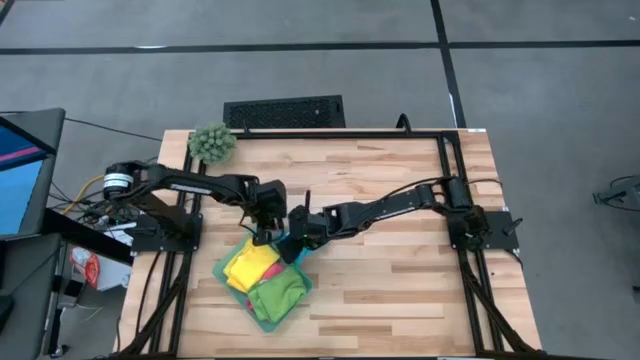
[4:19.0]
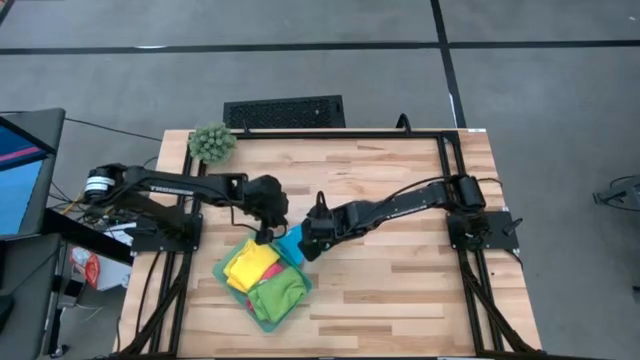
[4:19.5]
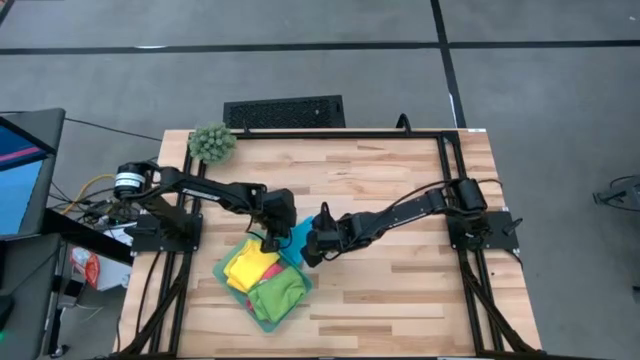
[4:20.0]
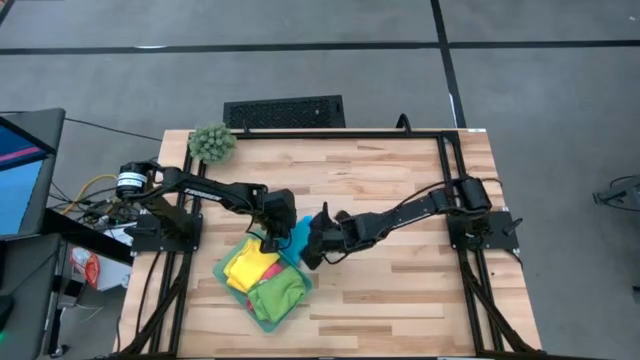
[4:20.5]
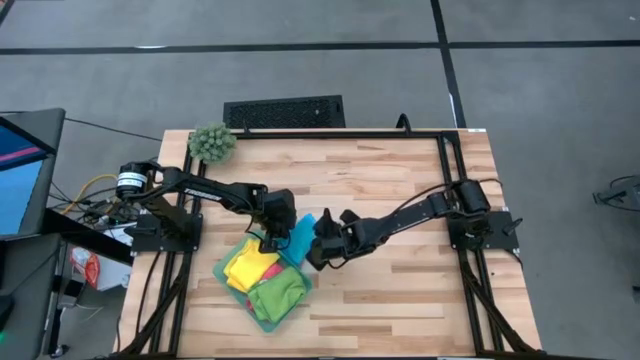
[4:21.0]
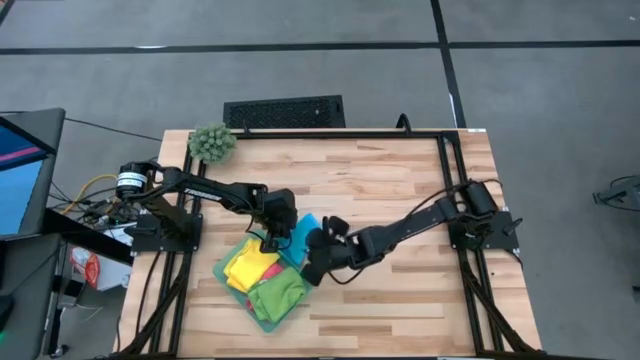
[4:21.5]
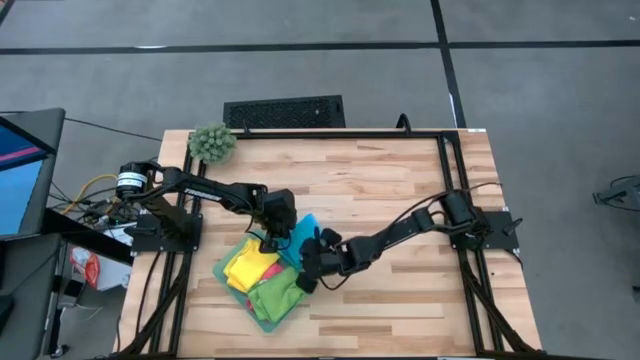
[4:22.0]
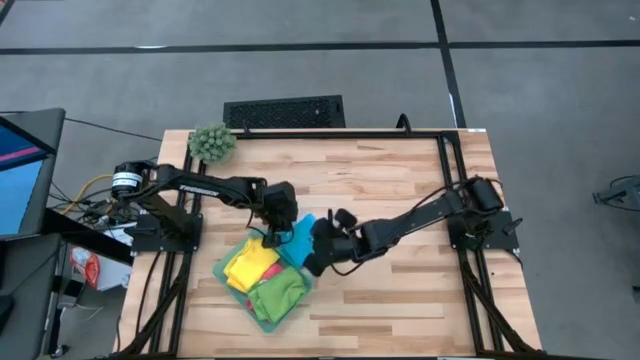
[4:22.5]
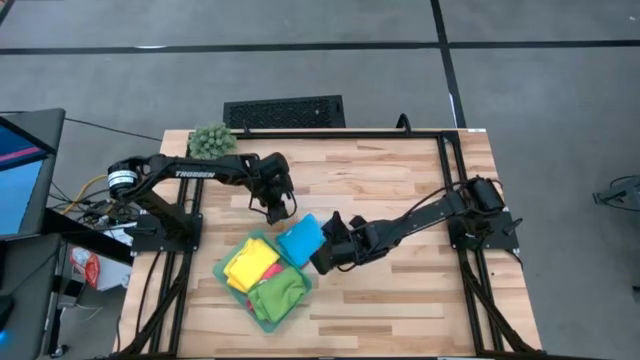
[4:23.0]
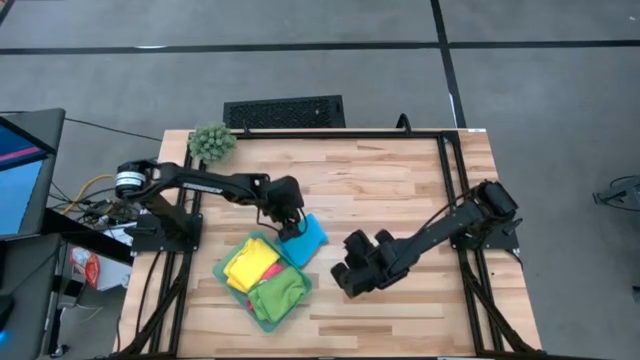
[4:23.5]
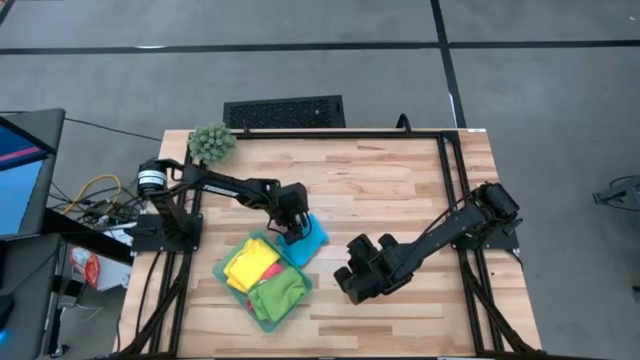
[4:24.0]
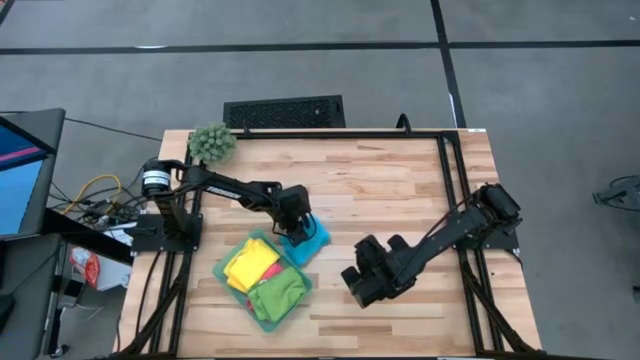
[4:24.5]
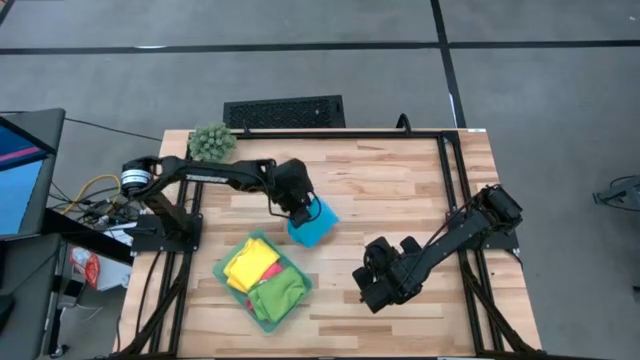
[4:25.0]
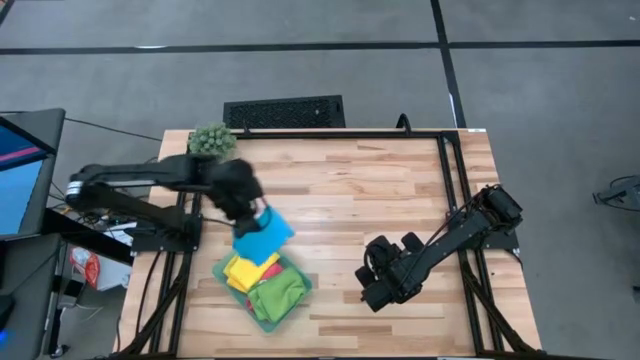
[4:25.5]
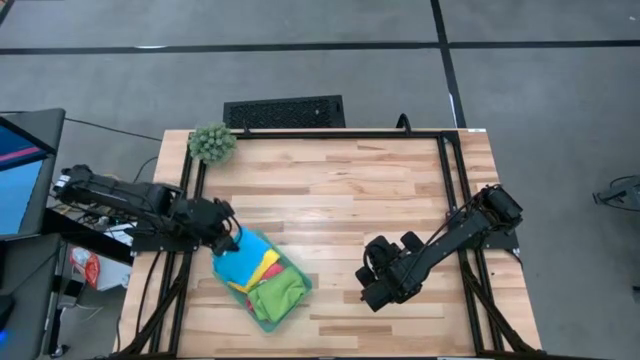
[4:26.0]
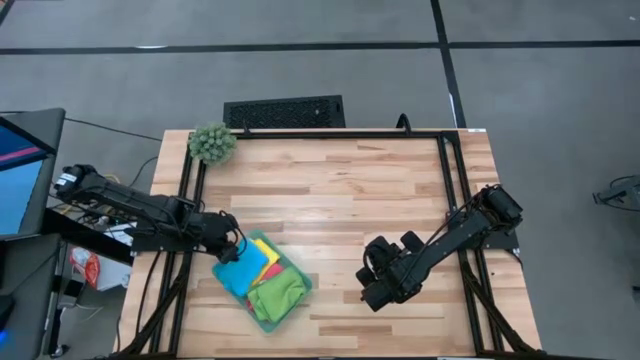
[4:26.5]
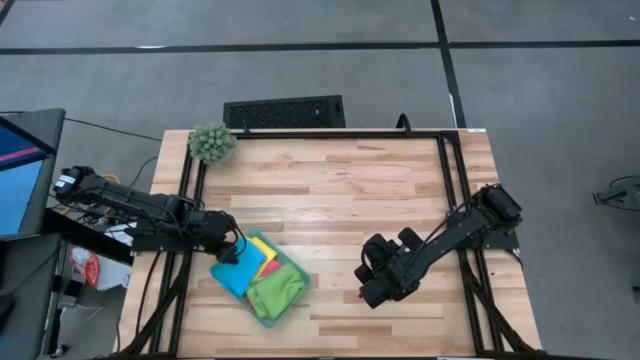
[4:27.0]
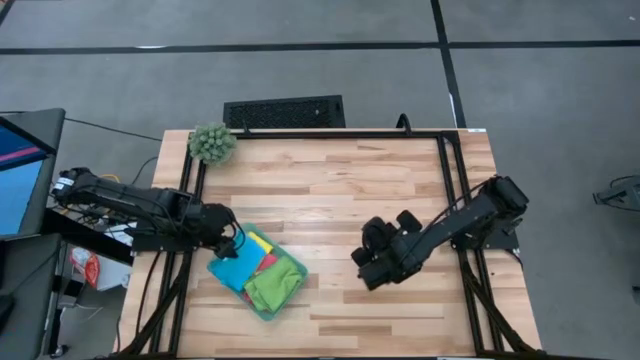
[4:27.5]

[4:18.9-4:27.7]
Task: Fold microfiber towels
Stack the folded blue towel on top of the folded yellow towel inside the green bin

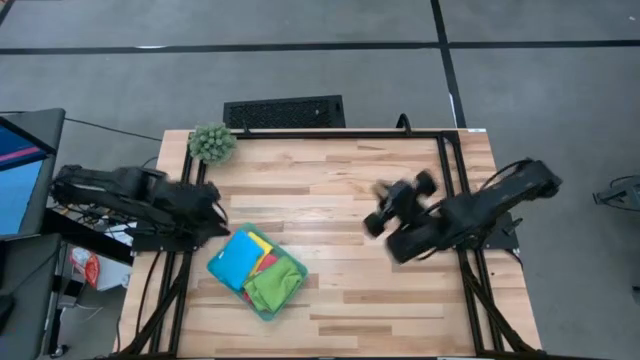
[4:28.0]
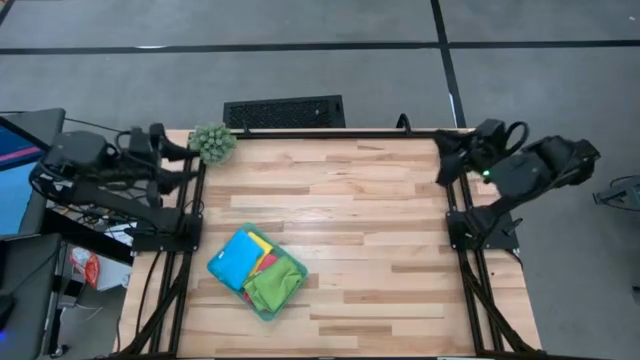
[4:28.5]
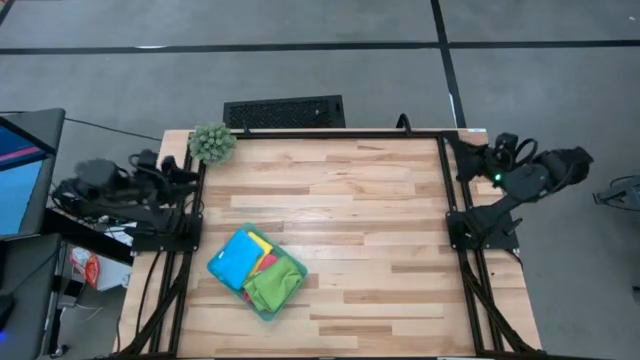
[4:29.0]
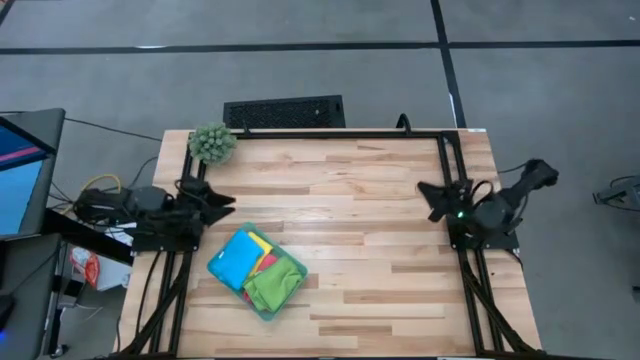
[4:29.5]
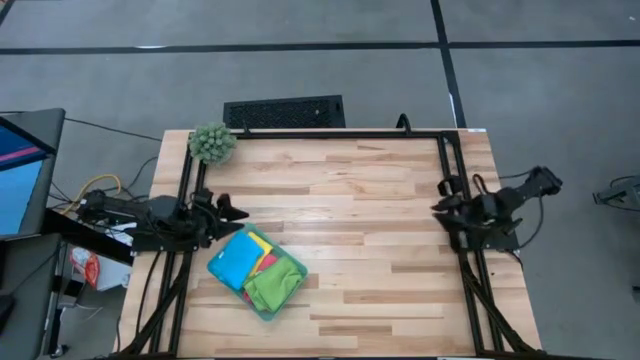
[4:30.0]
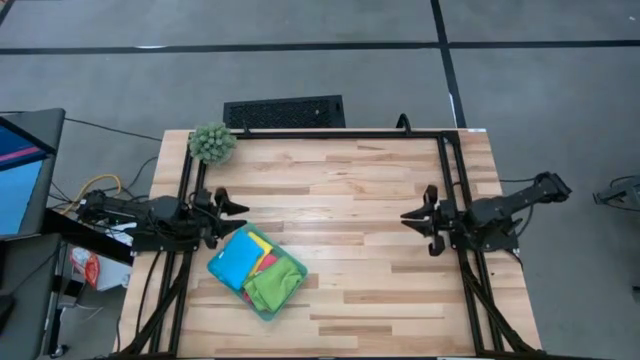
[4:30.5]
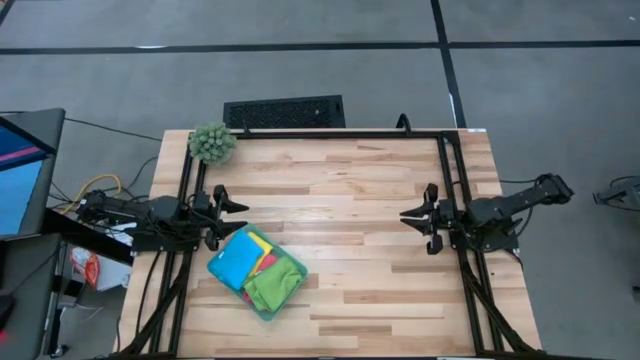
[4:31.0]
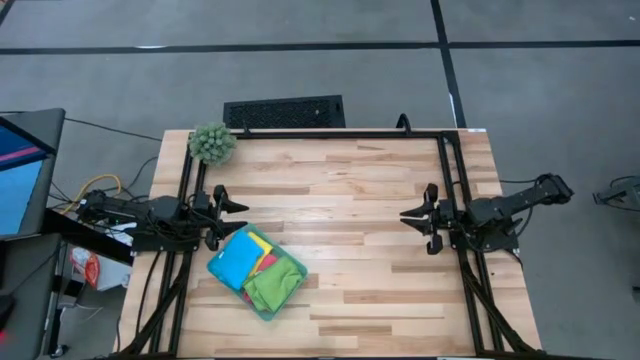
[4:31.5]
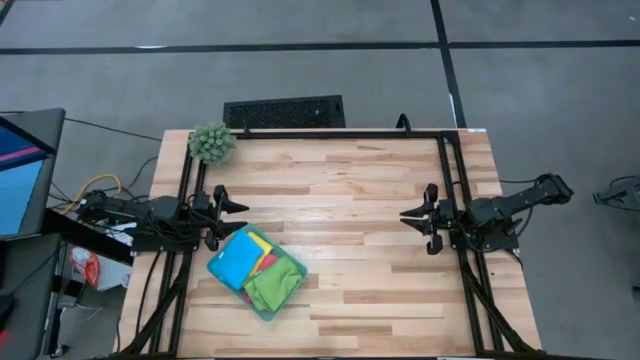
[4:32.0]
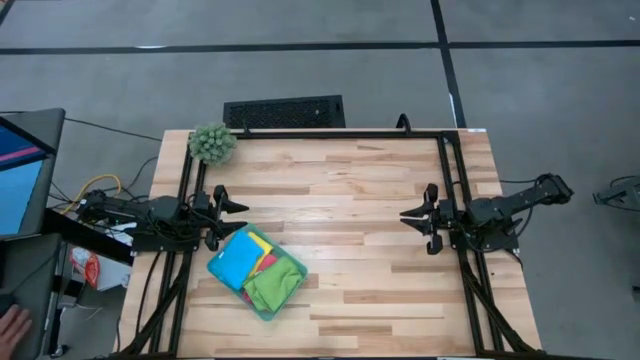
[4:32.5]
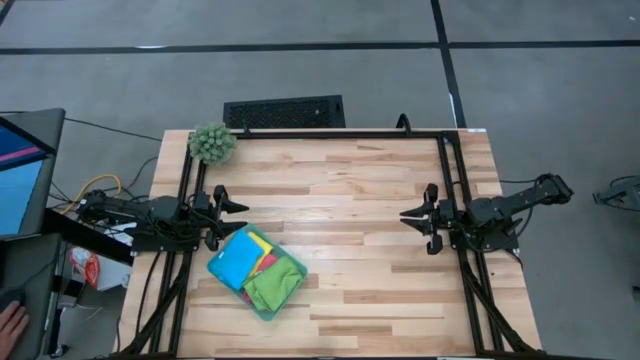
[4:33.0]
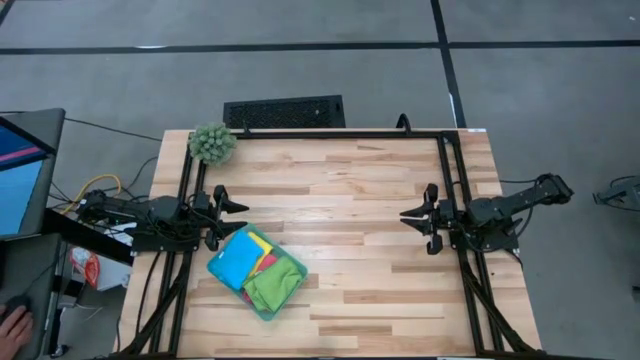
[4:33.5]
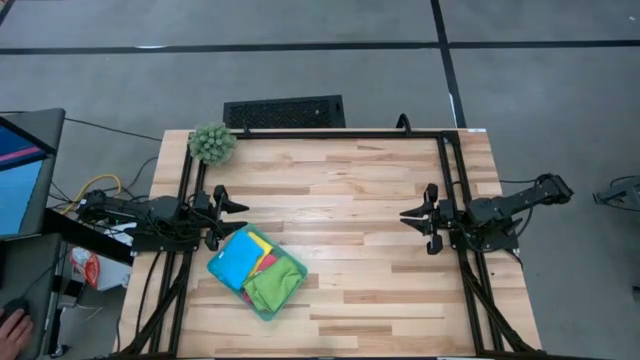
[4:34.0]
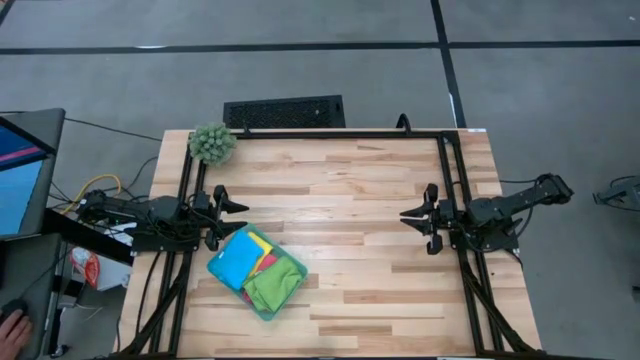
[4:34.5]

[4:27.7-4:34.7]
Return to Home Position
